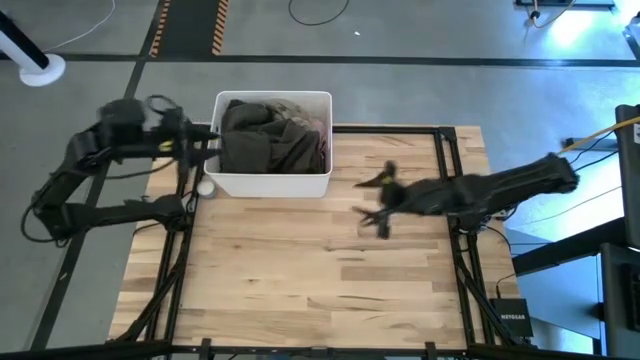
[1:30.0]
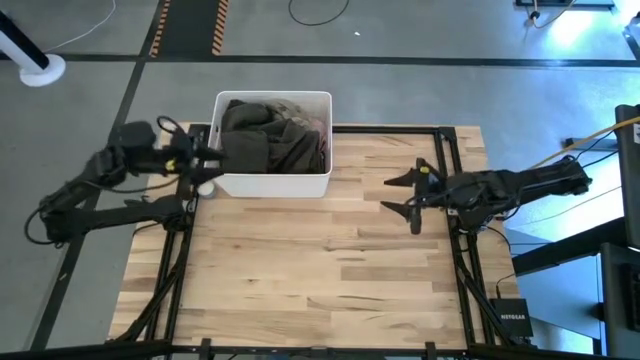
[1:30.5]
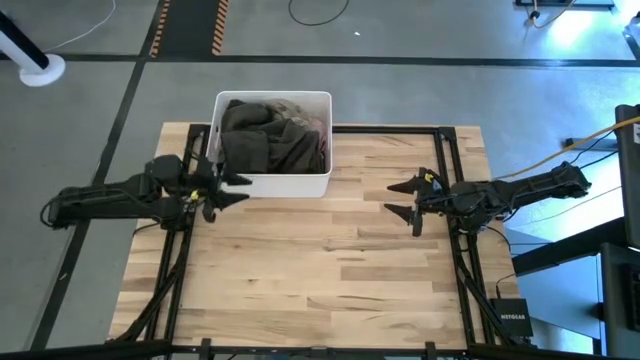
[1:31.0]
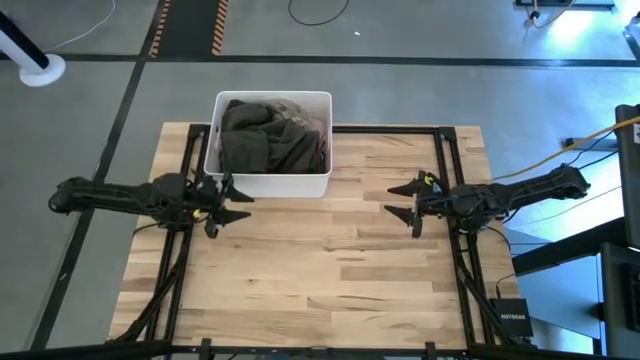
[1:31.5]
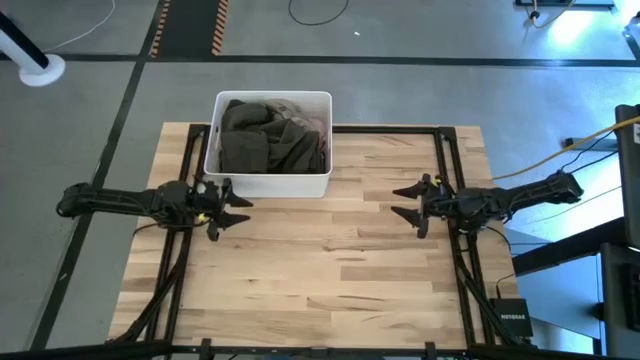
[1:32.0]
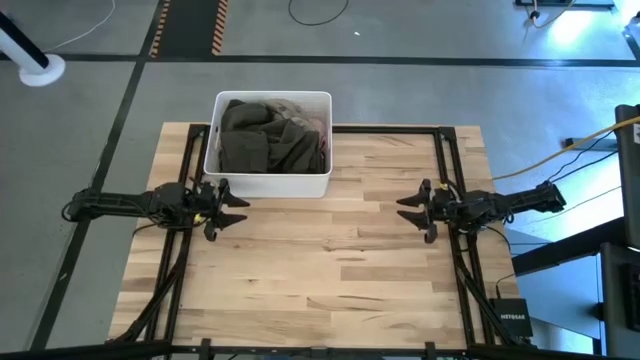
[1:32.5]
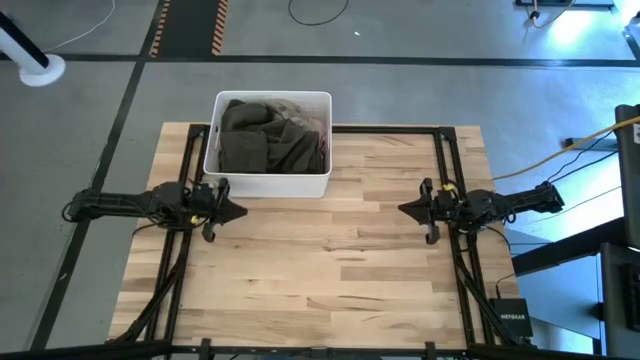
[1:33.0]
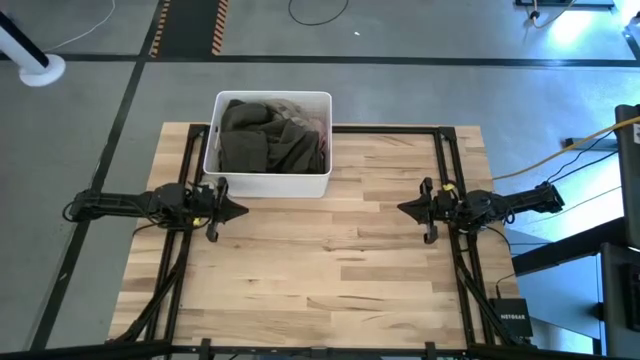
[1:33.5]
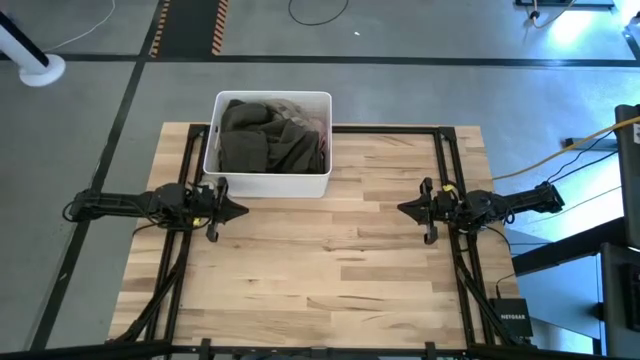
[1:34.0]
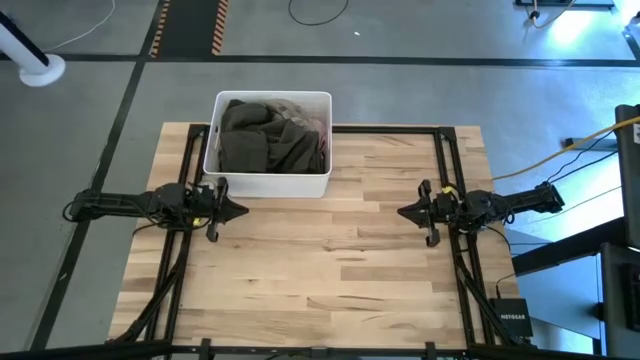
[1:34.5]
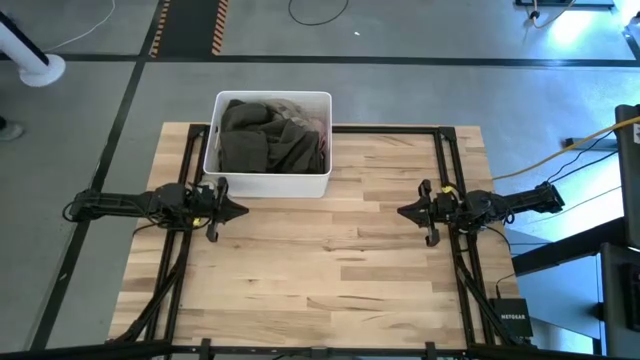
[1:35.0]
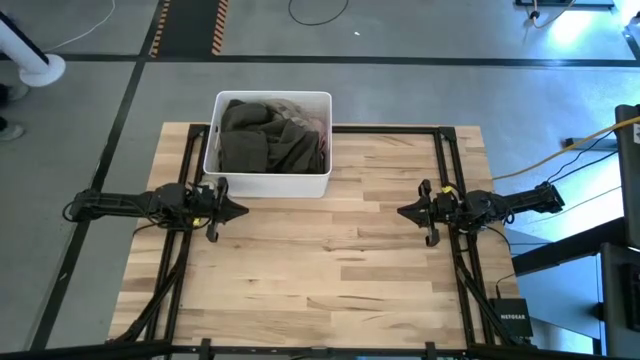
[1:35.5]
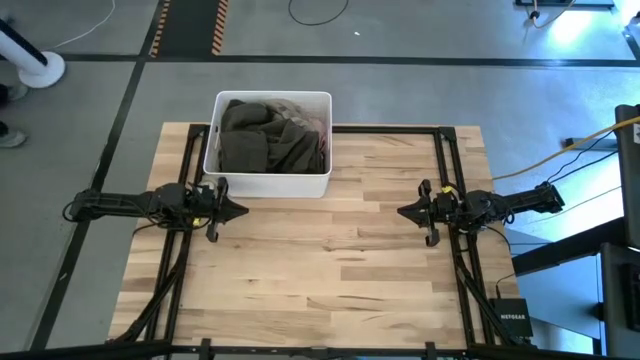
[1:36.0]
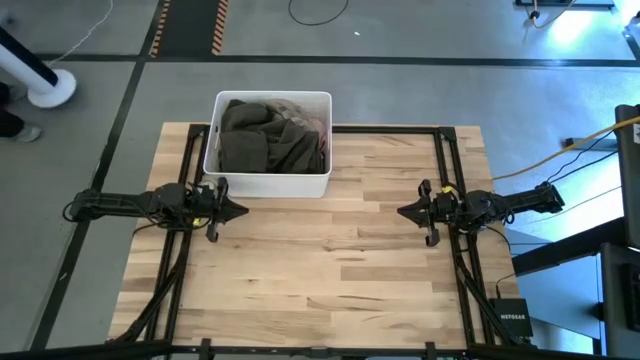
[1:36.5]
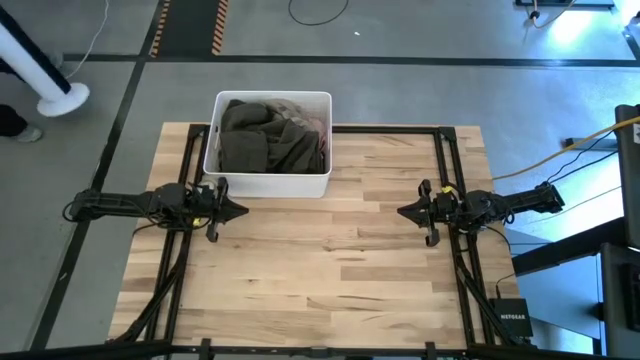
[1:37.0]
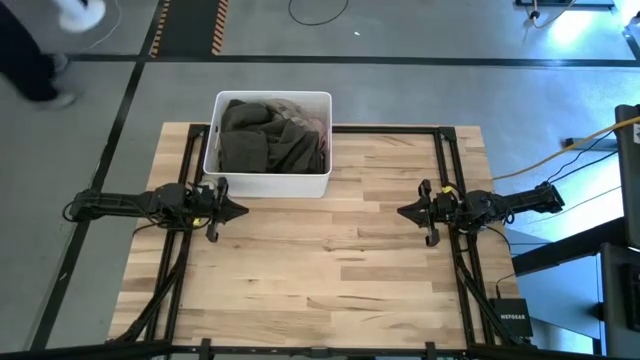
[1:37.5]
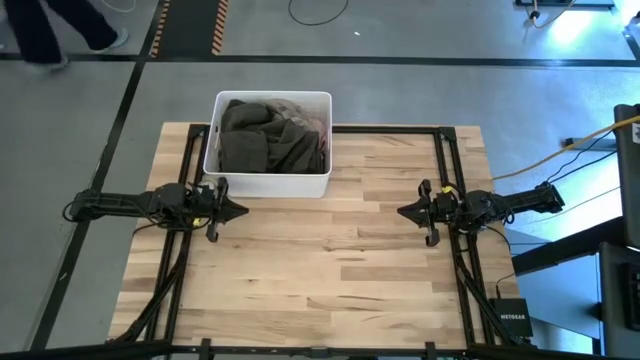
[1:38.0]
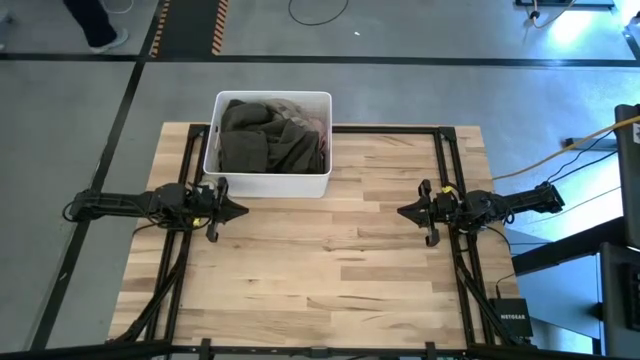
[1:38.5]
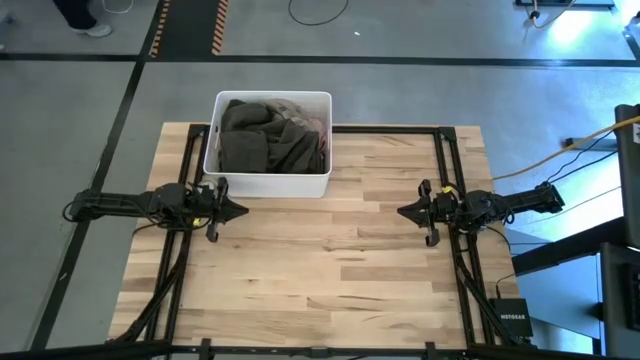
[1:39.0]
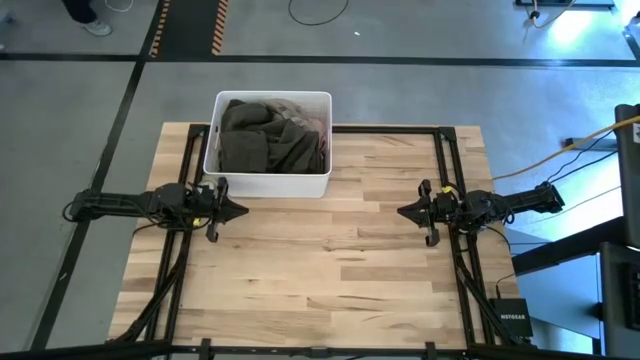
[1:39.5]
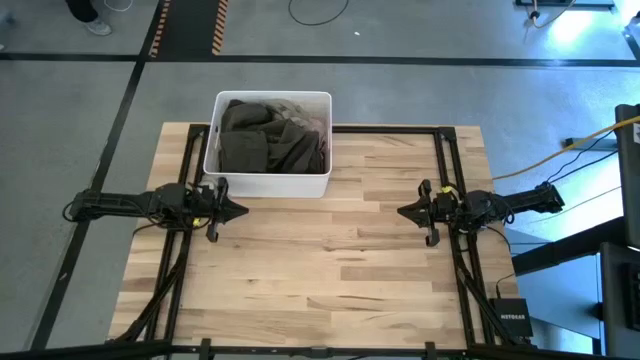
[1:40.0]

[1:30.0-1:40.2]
Task: Sort clothes
Return to Home Position

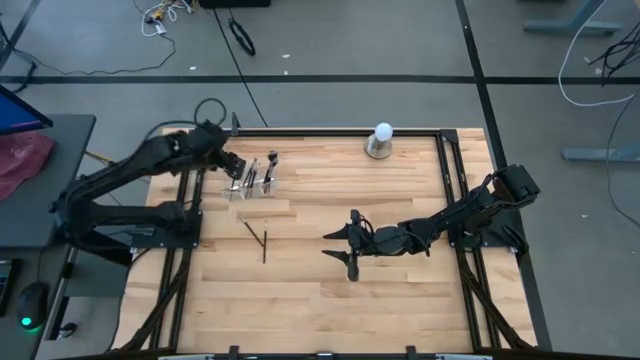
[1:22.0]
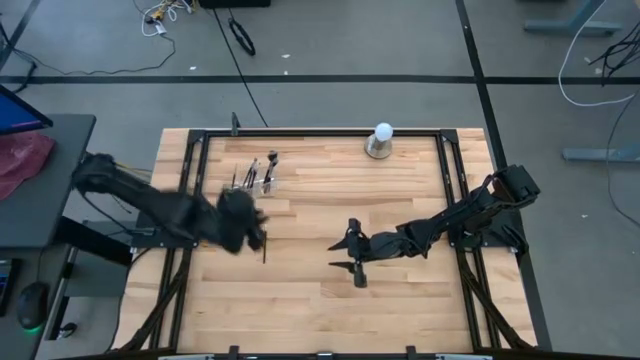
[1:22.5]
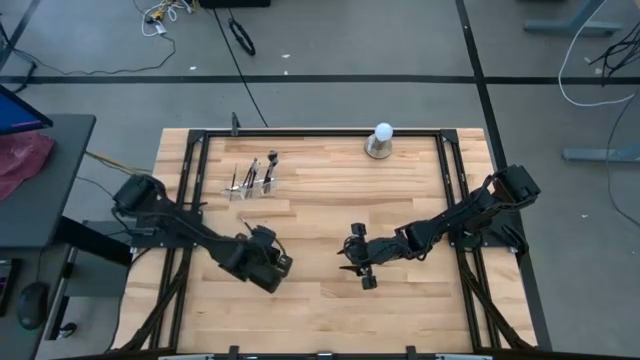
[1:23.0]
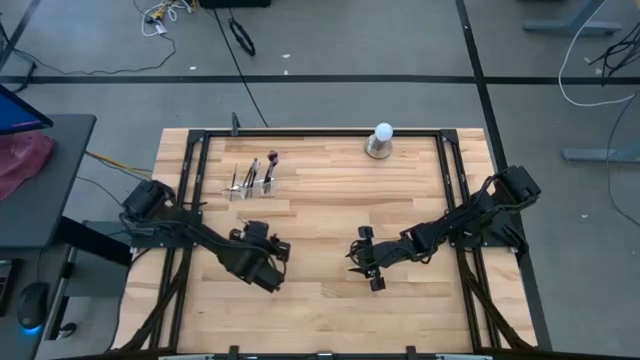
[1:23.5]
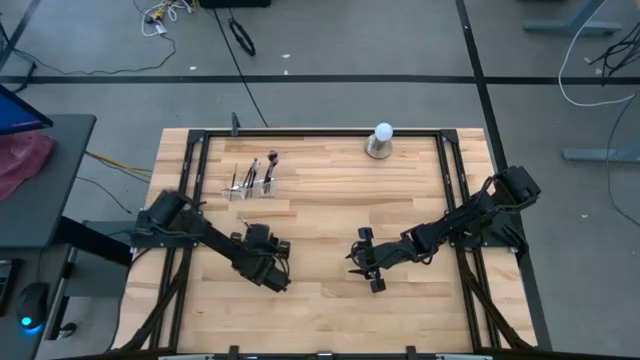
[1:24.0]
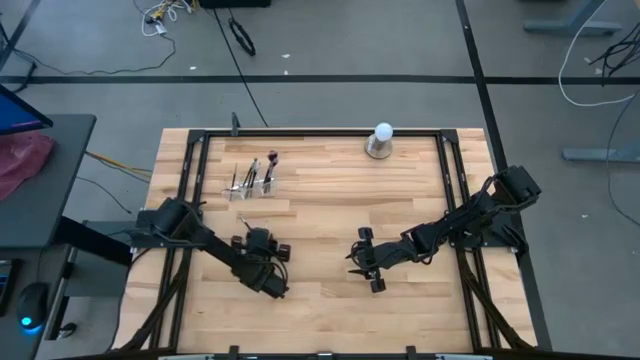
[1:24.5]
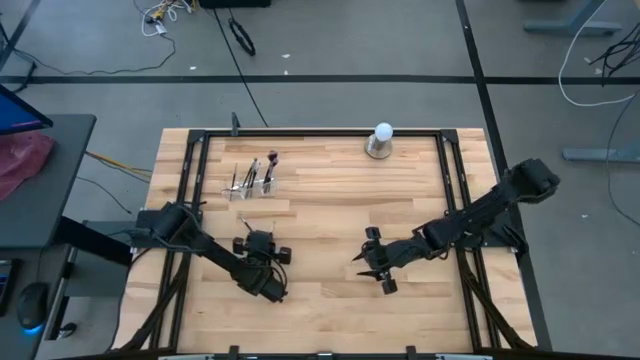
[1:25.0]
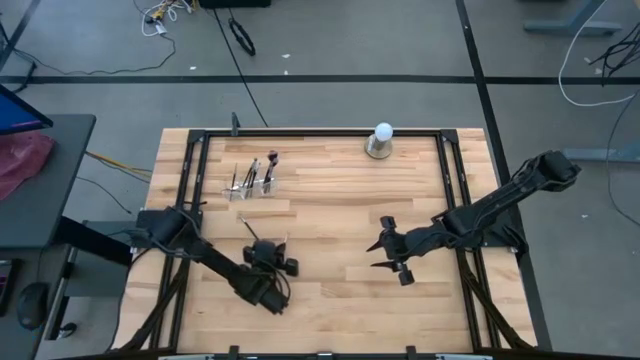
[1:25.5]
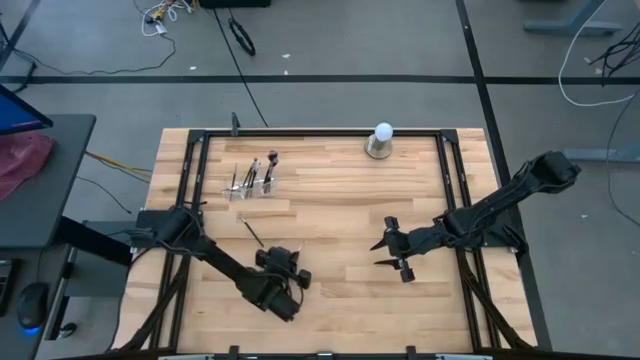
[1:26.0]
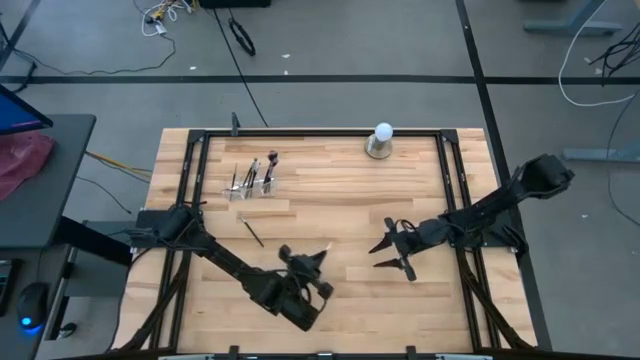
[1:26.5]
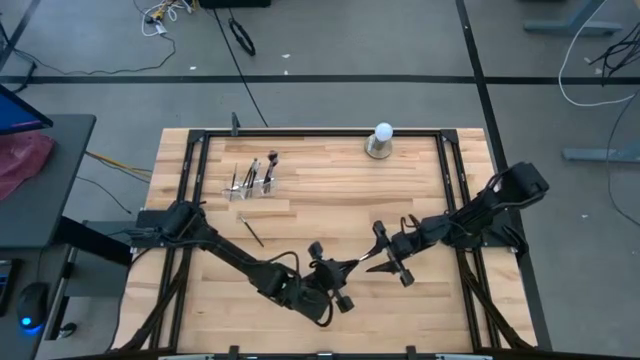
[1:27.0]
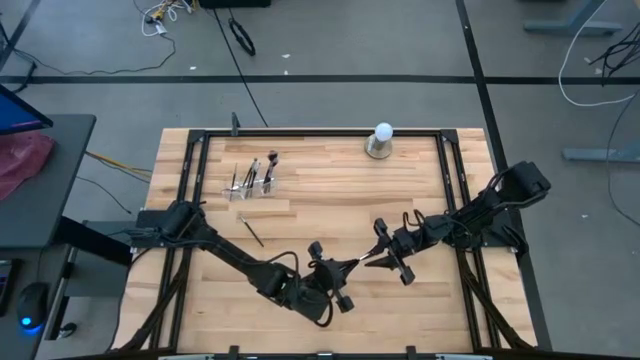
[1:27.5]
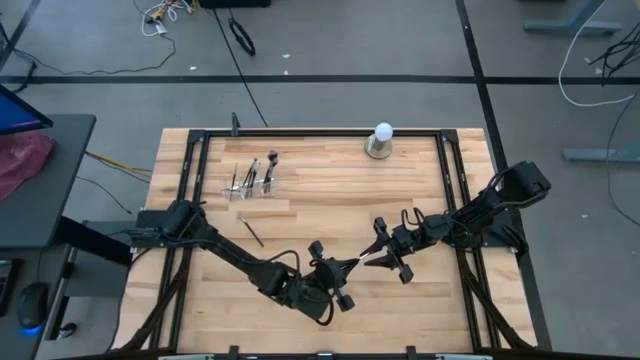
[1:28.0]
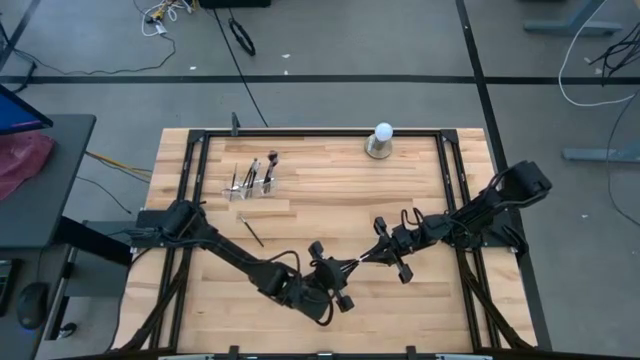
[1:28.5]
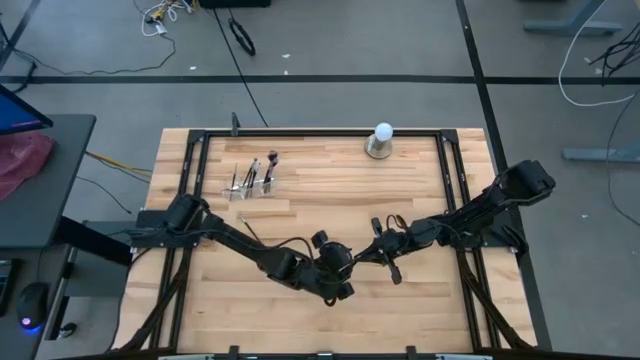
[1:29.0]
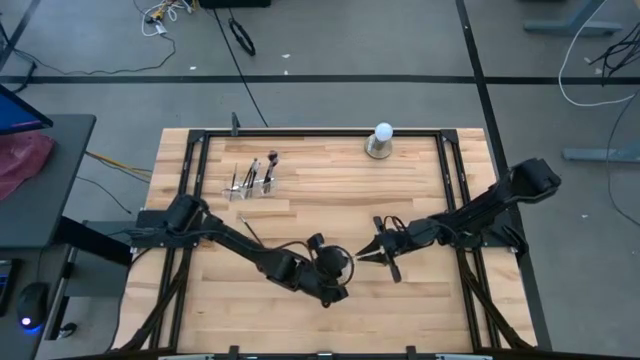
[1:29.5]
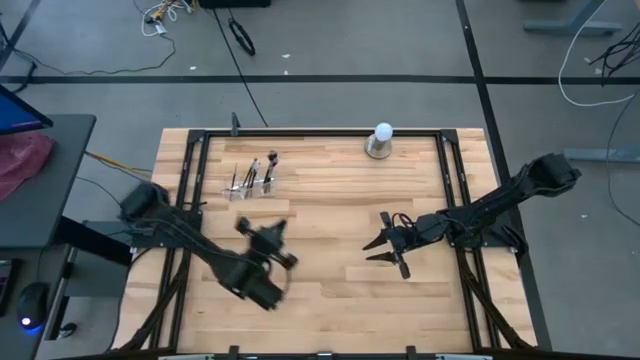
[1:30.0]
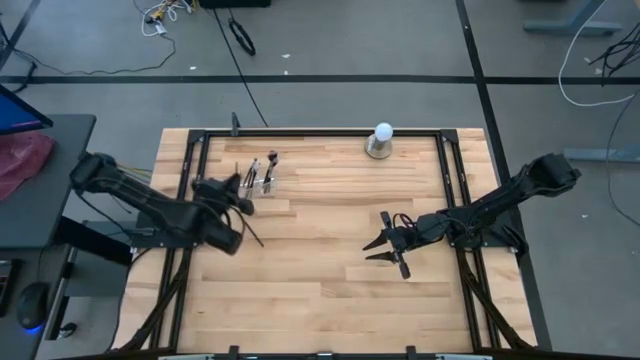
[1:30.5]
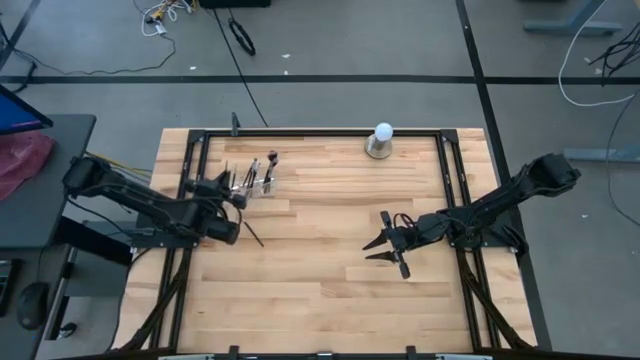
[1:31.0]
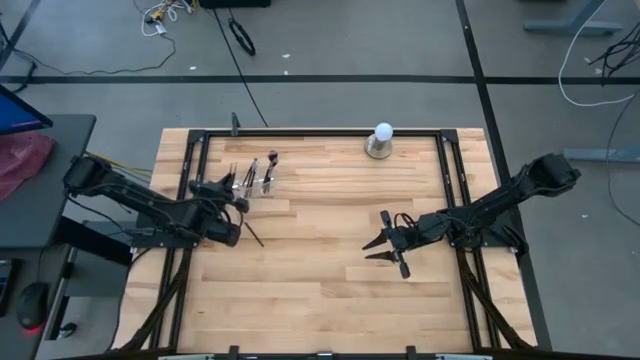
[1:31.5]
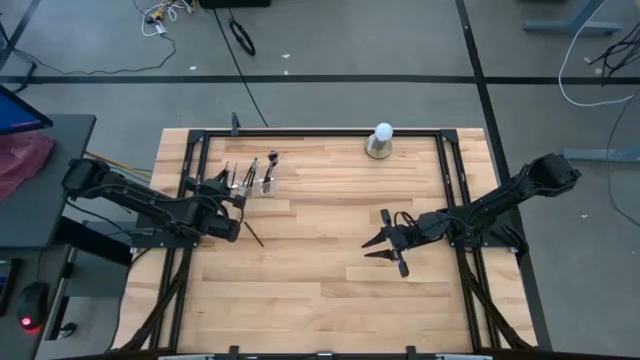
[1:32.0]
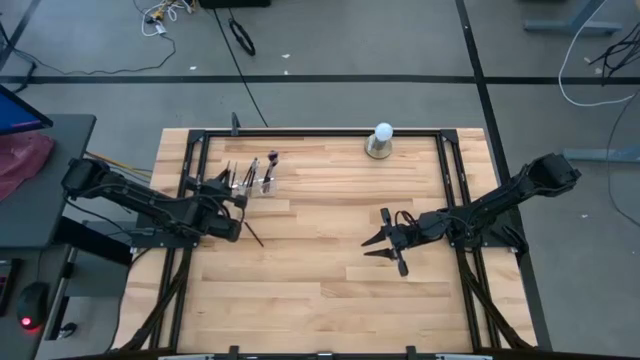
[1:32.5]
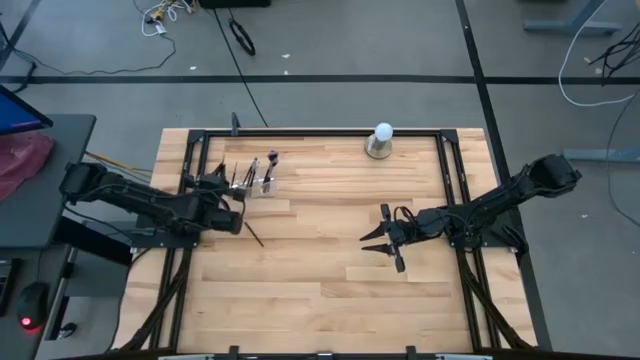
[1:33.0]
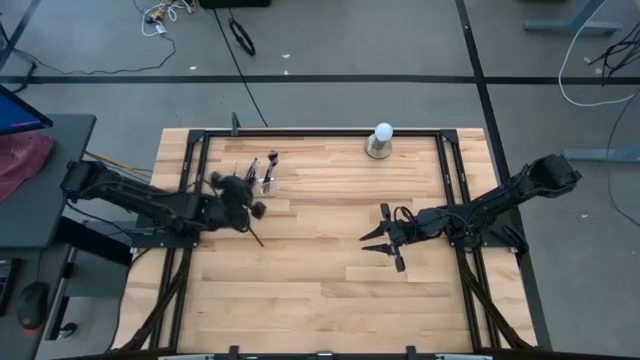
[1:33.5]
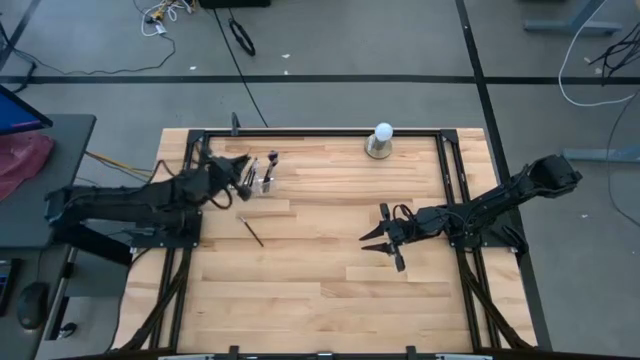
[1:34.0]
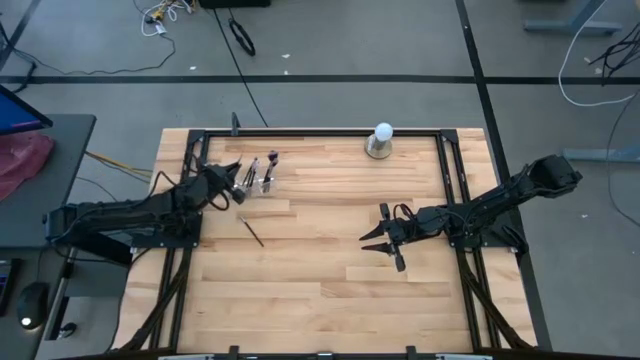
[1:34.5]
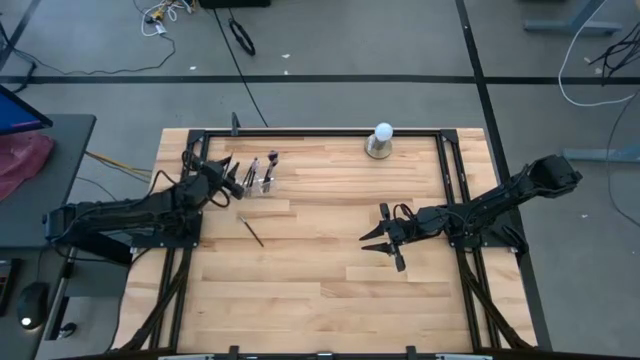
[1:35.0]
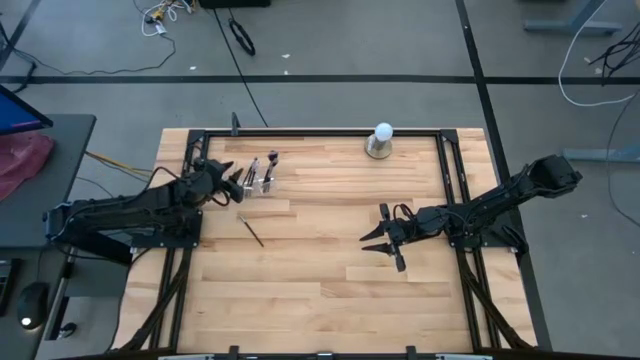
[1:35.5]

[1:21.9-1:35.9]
Task: Put items in baskets/containers
Put the black eyeshadow brush into the left section of the transparent organizer
